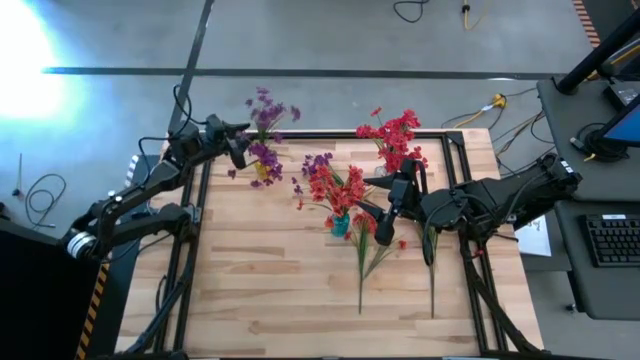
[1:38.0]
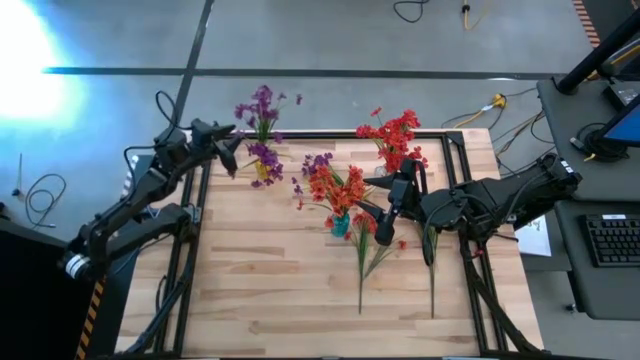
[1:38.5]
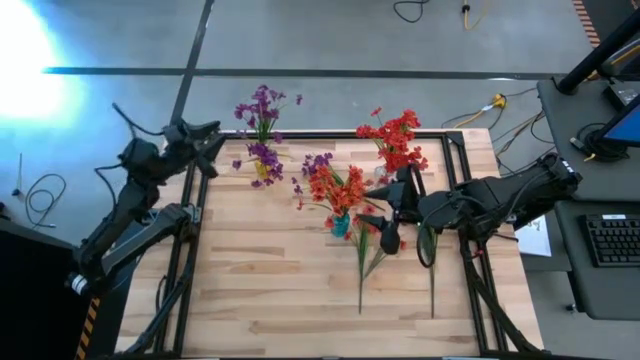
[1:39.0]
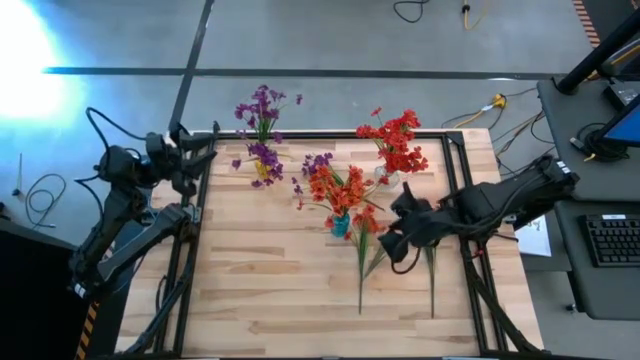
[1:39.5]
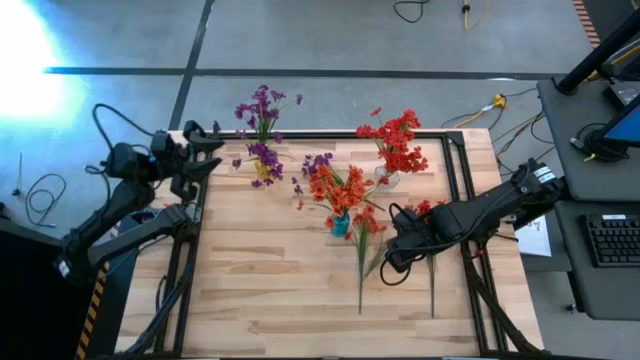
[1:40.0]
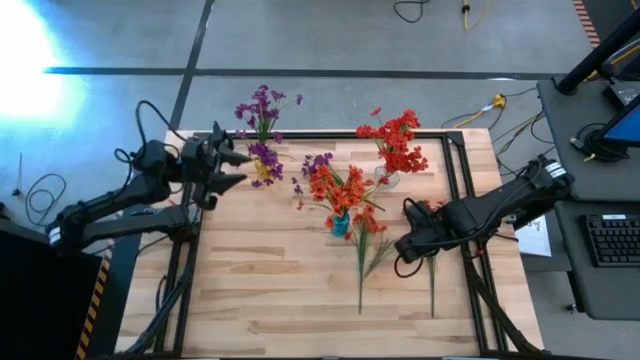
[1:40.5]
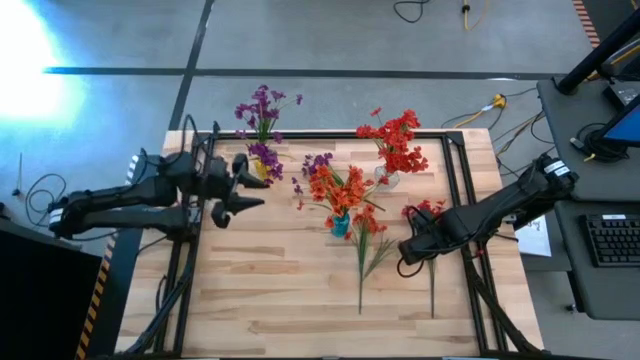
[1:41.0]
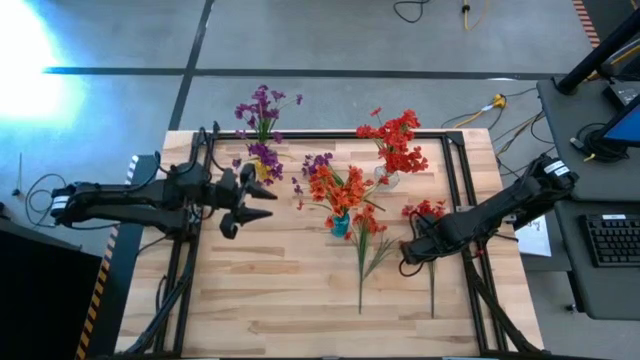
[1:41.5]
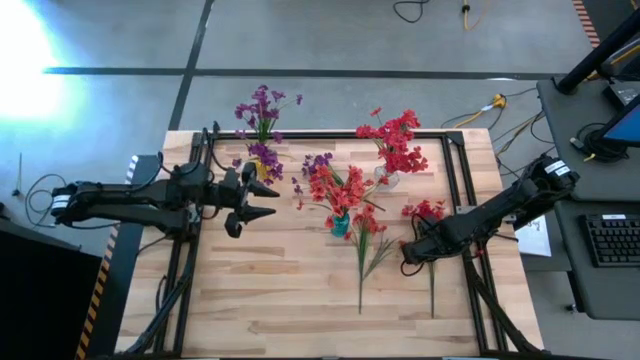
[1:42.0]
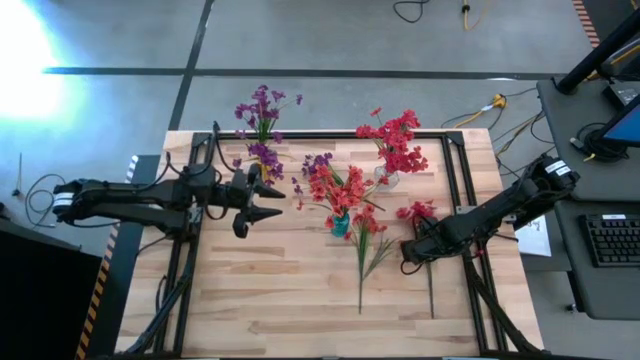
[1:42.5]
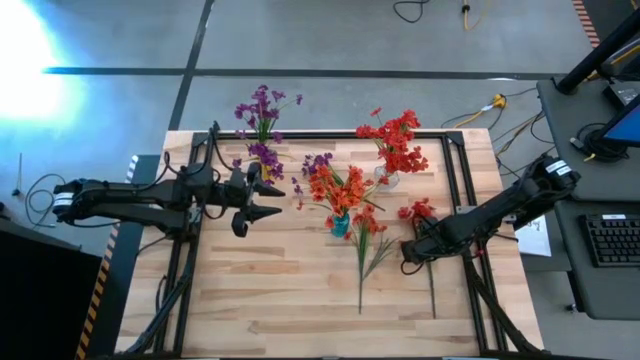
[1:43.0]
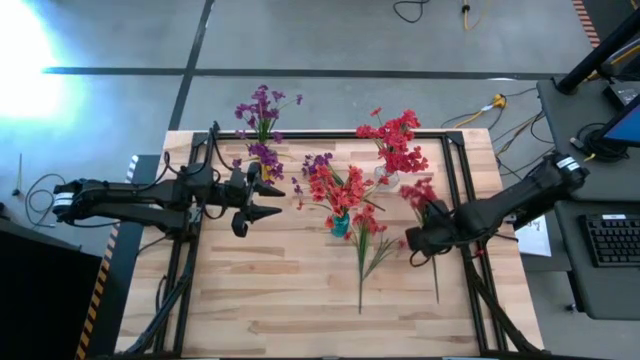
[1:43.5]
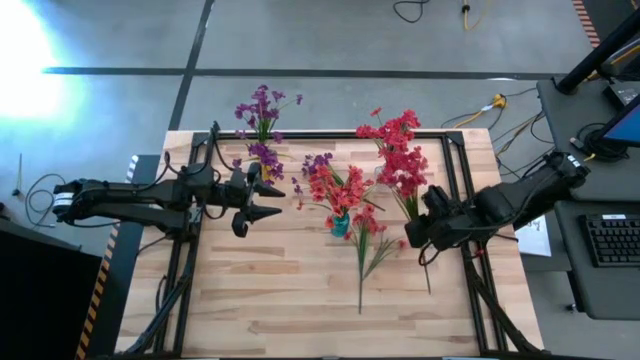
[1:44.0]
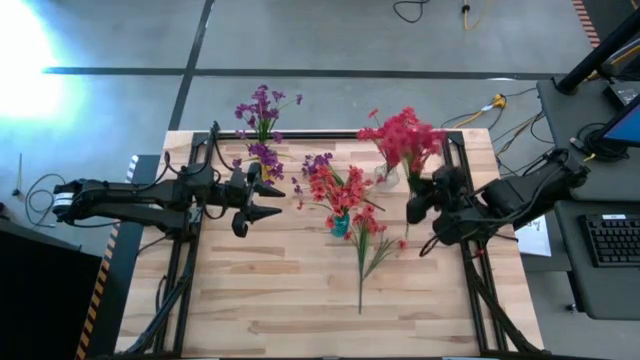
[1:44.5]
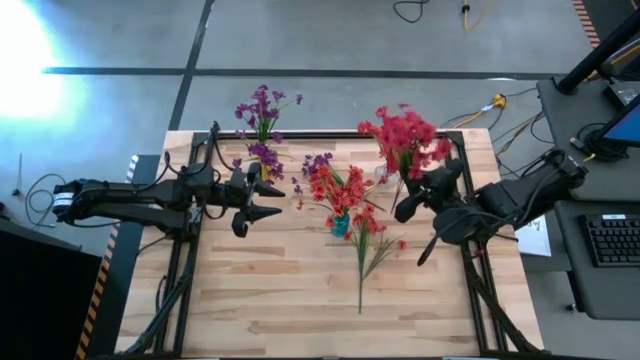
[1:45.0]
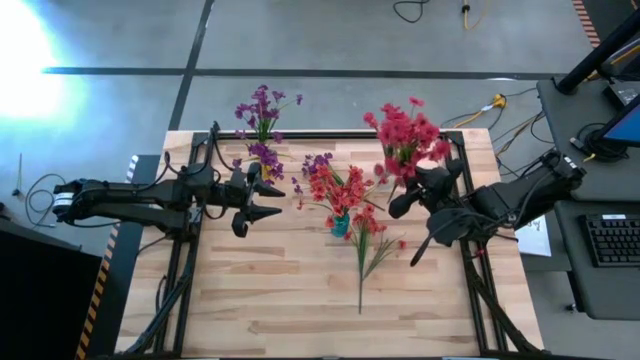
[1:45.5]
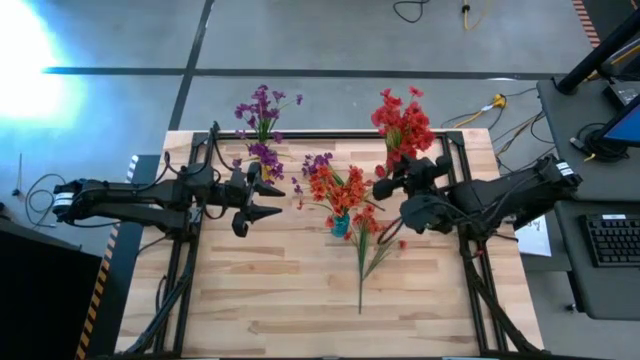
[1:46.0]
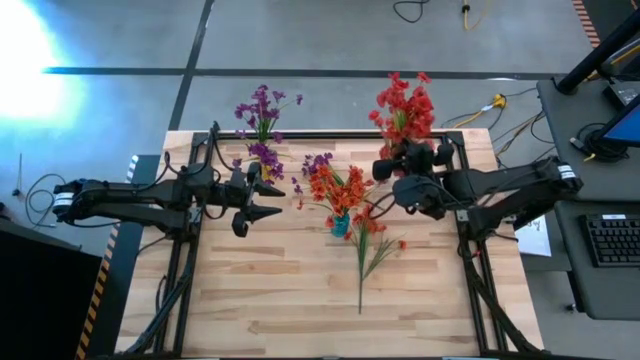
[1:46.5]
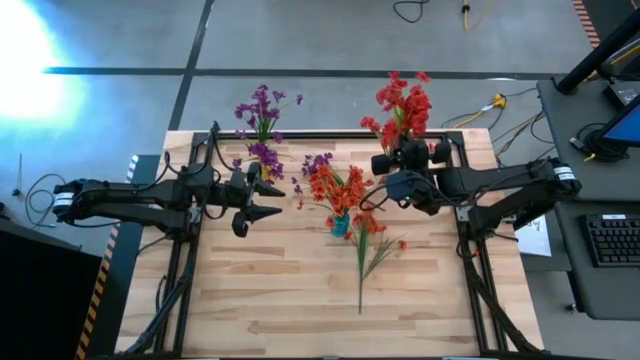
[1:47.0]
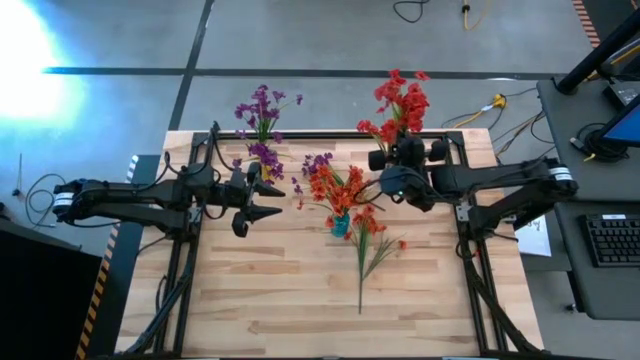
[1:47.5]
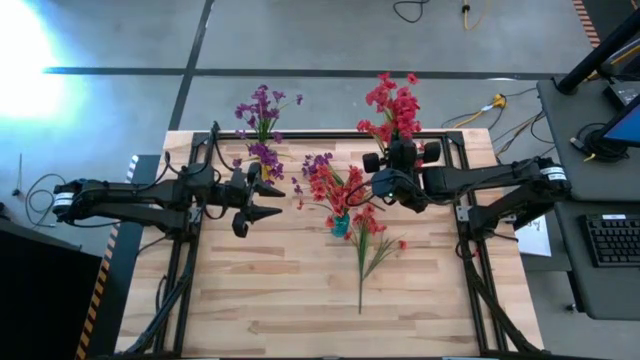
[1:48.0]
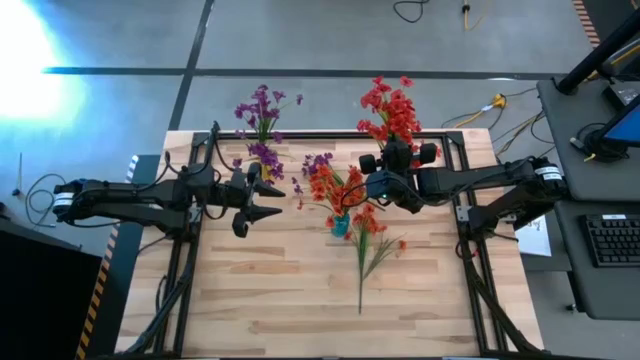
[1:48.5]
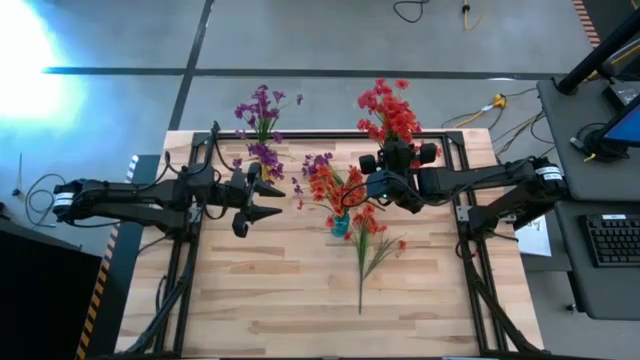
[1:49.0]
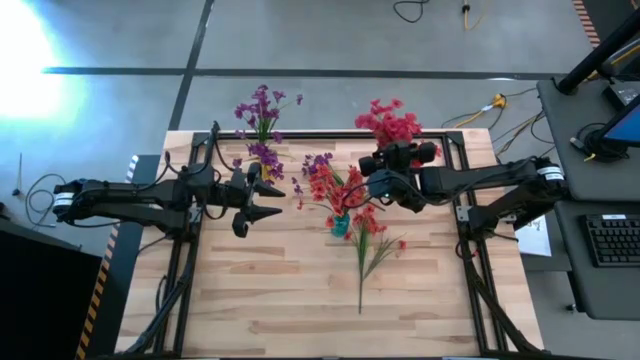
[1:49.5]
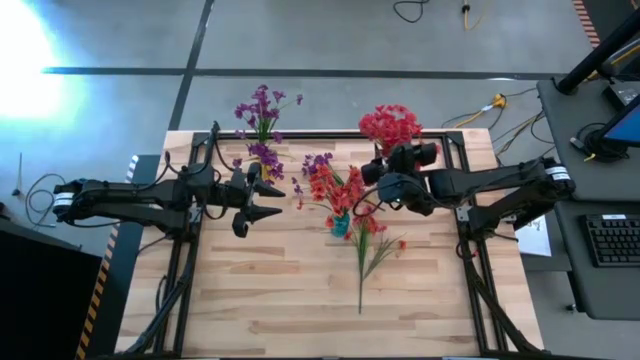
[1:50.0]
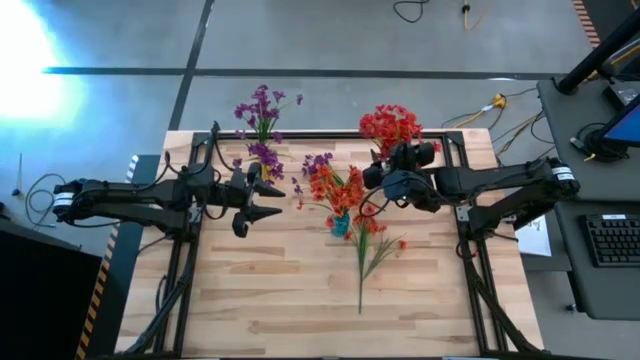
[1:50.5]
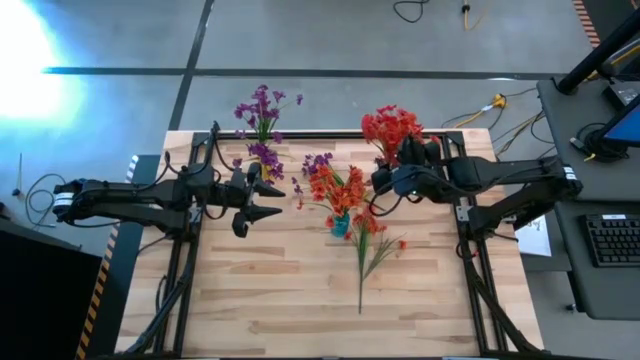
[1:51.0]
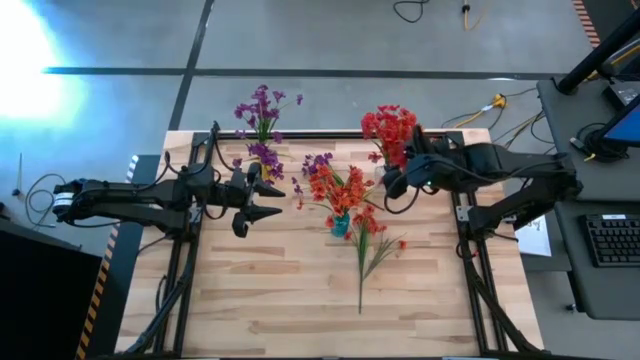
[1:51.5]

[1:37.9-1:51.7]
Task: Sort flowers into vase by color
Put the red flowers into the transparent vase

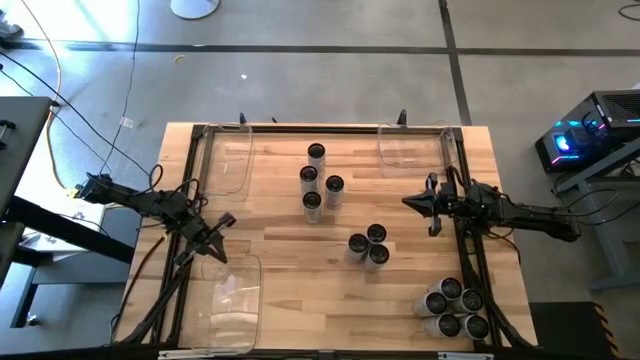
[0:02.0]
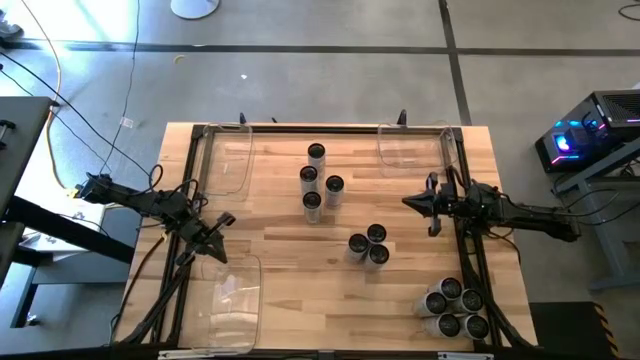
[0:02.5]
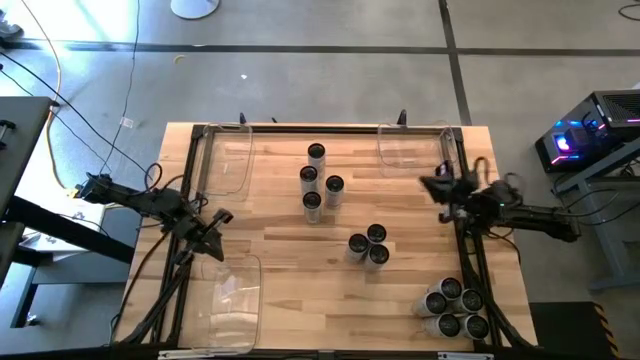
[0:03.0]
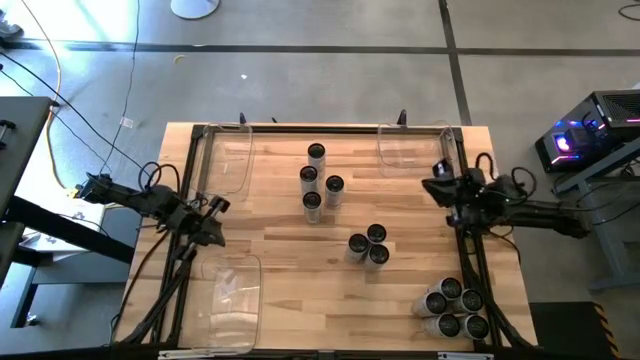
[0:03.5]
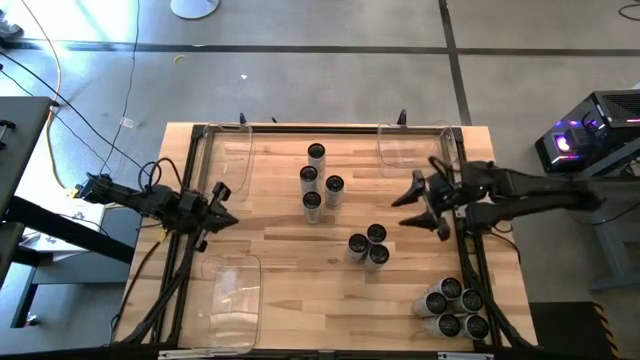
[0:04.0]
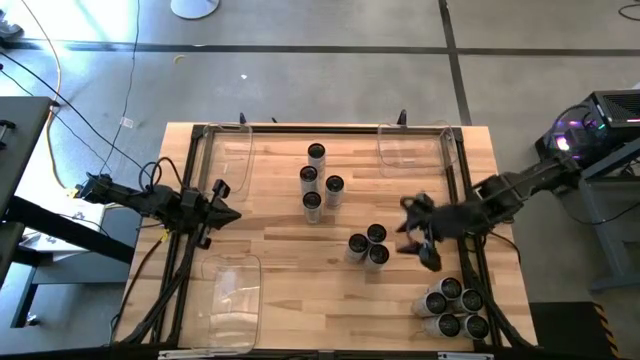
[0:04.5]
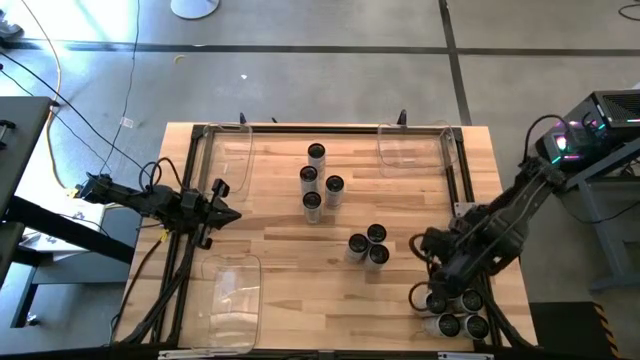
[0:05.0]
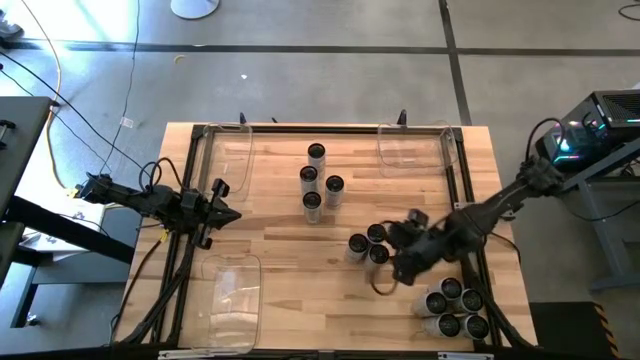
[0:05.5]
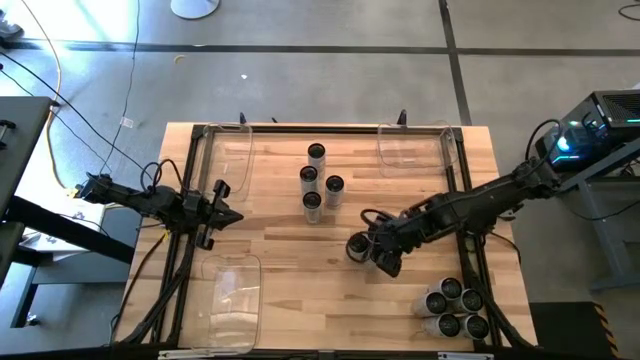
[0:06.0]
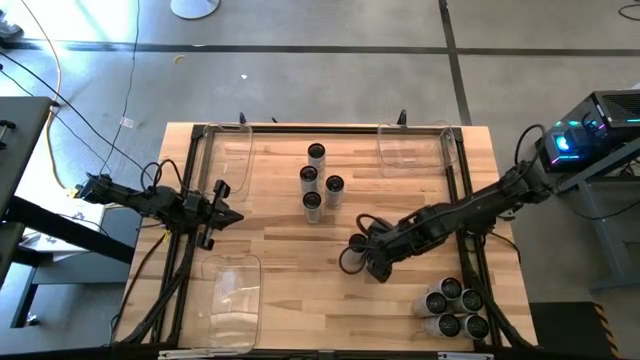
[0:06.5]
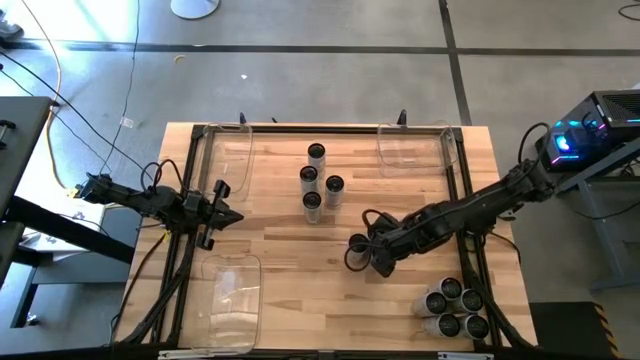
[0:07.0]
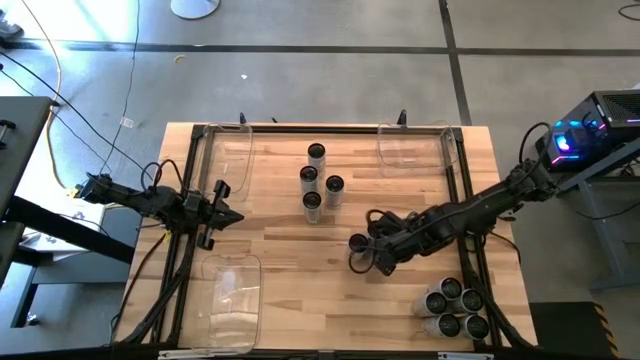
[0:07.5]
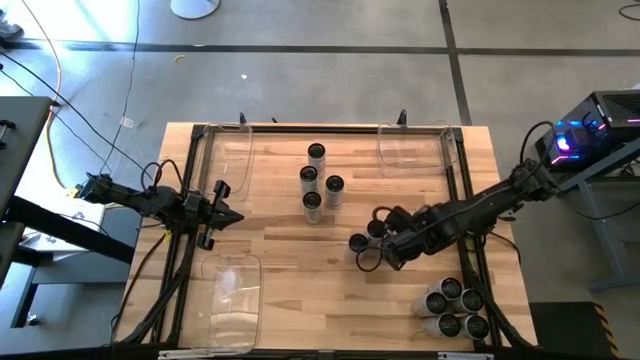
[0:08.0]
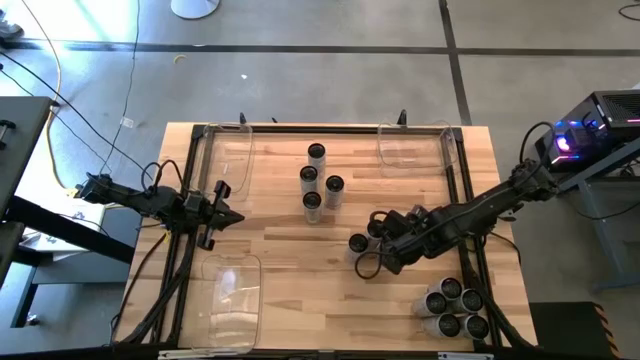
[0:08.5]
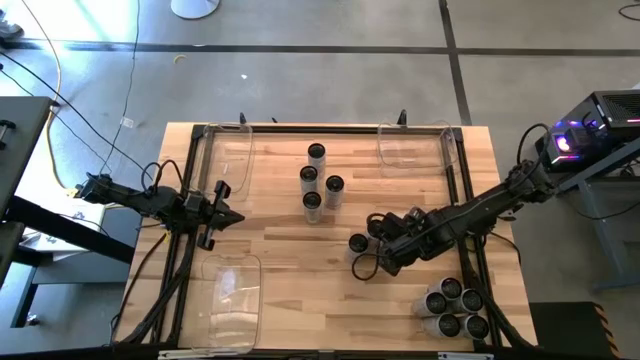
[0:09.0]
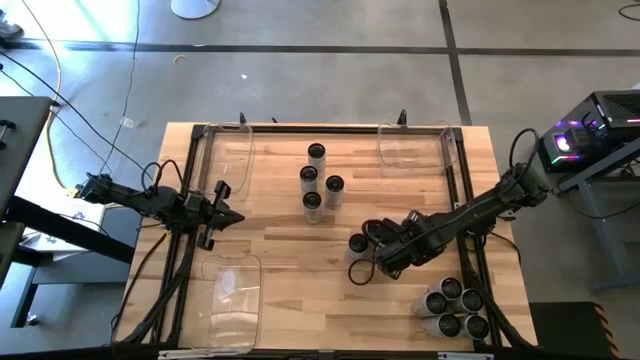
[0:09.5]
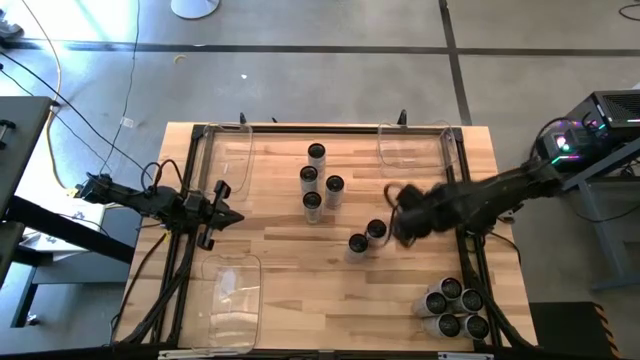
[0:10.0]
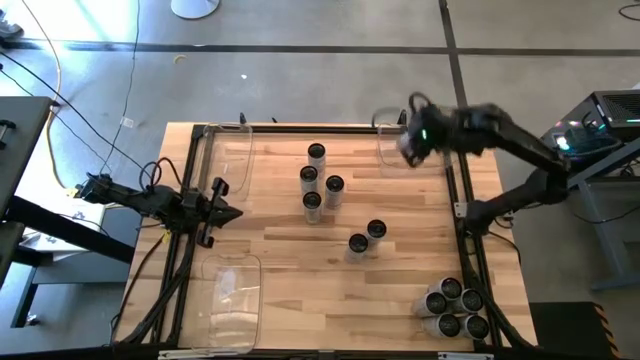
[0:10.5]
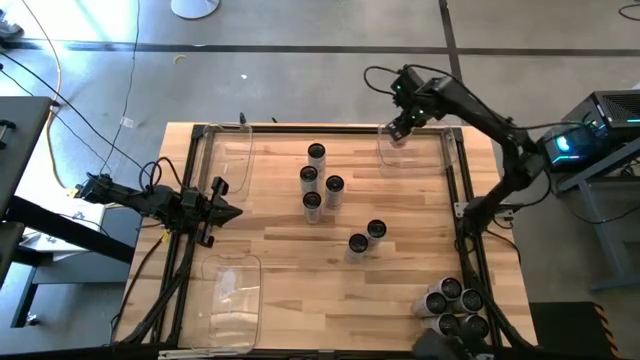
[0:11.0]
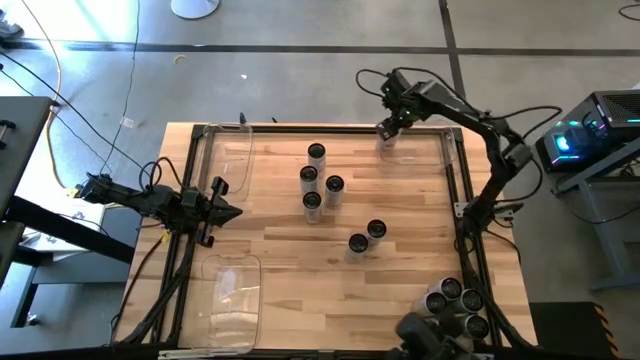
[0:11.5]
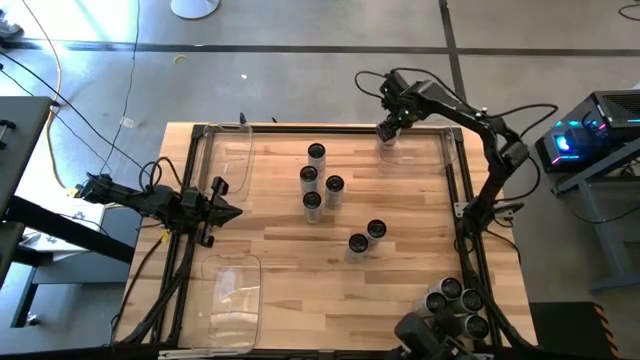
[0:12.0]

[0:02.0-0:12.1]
Task: Sort soda cans
Put the white pink soda can into the top right transparent bin
